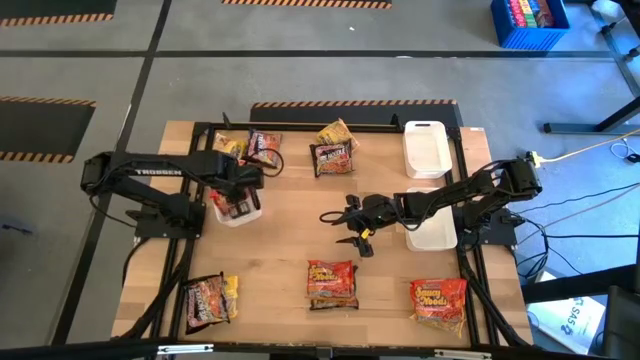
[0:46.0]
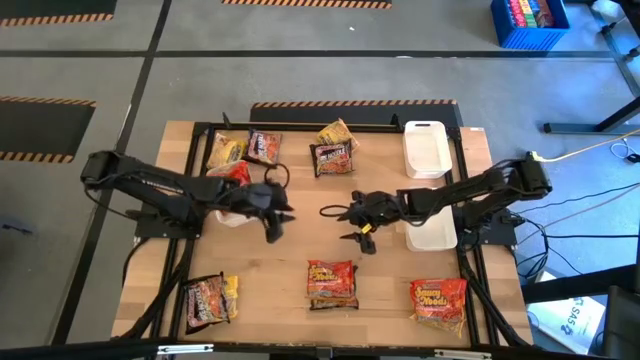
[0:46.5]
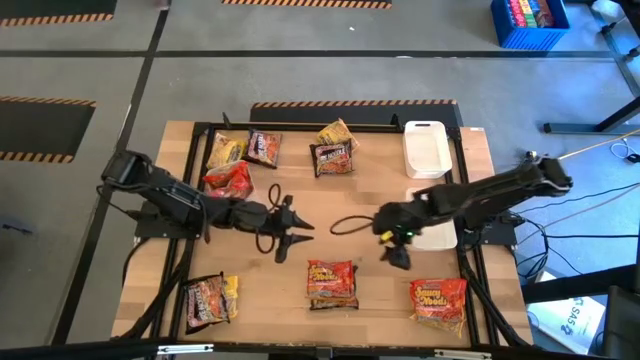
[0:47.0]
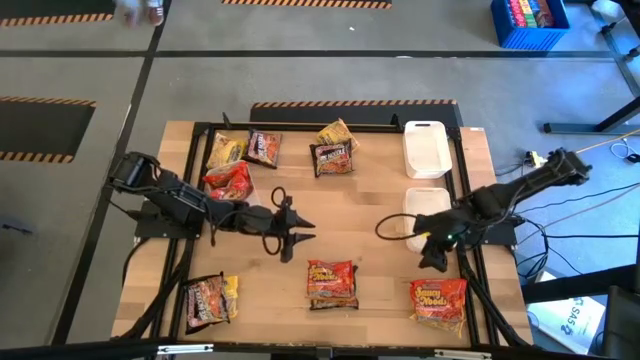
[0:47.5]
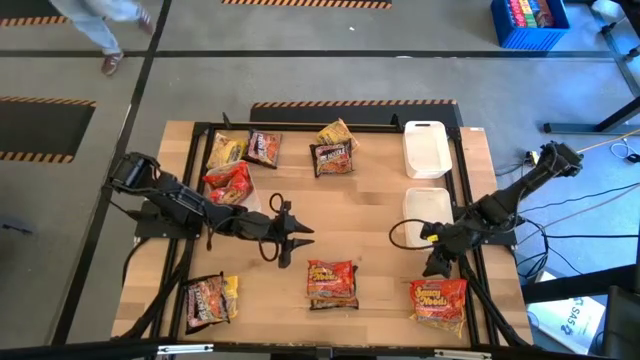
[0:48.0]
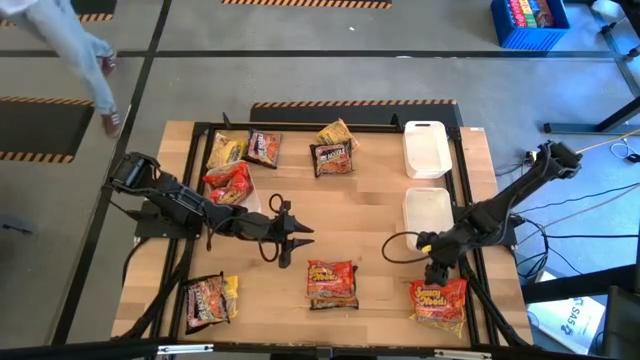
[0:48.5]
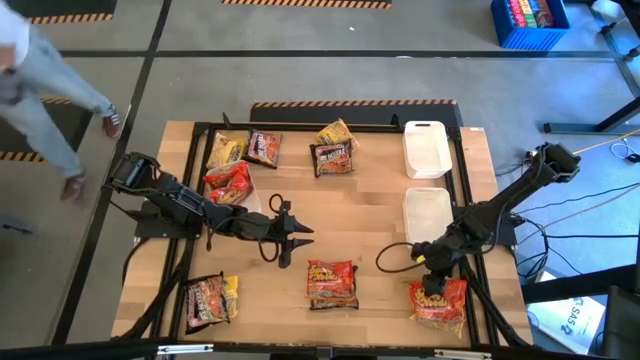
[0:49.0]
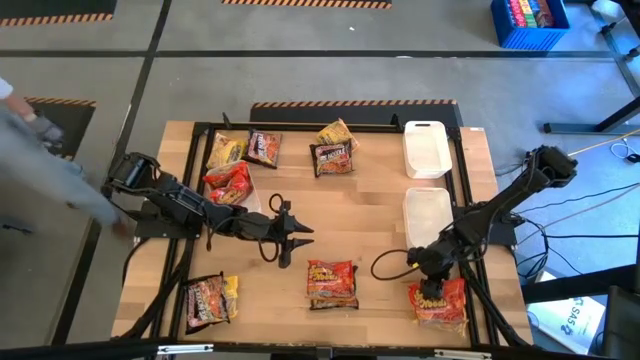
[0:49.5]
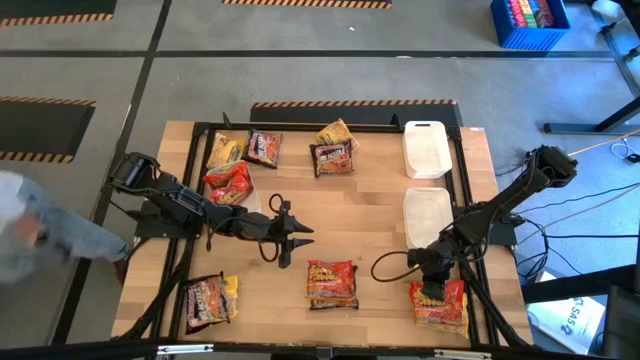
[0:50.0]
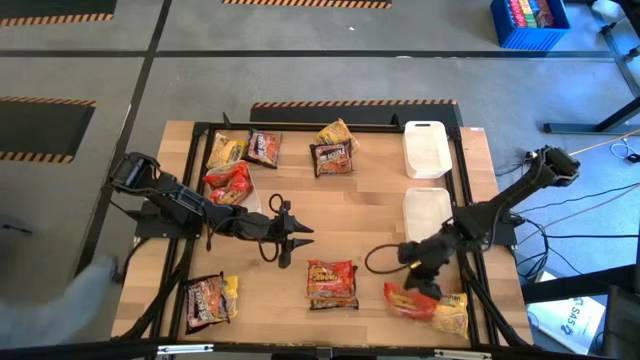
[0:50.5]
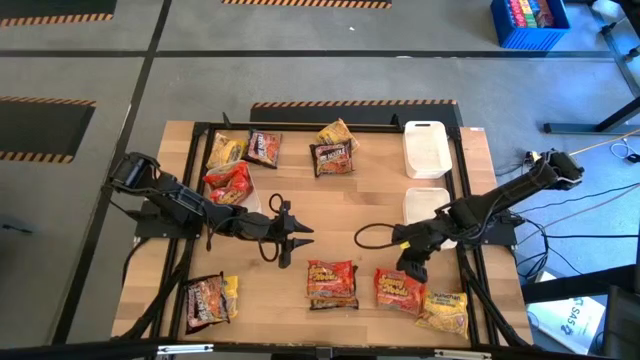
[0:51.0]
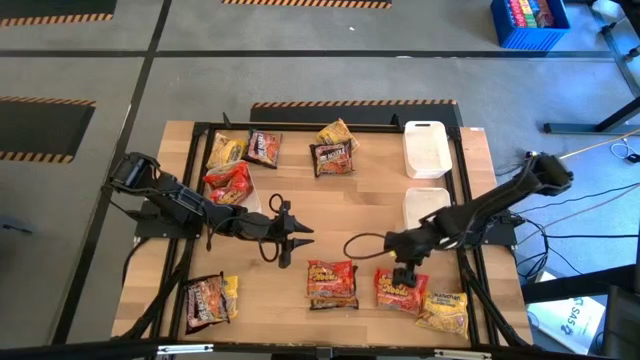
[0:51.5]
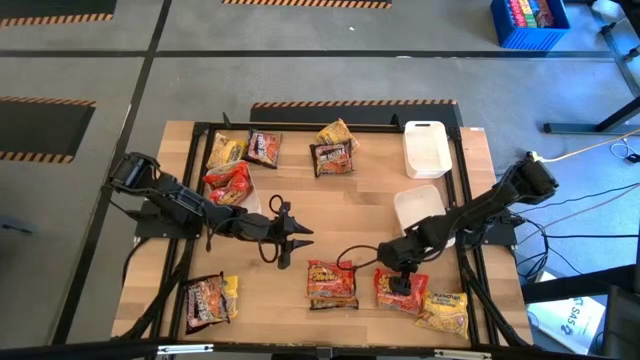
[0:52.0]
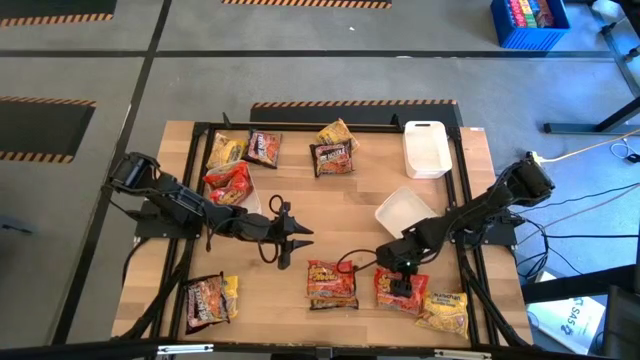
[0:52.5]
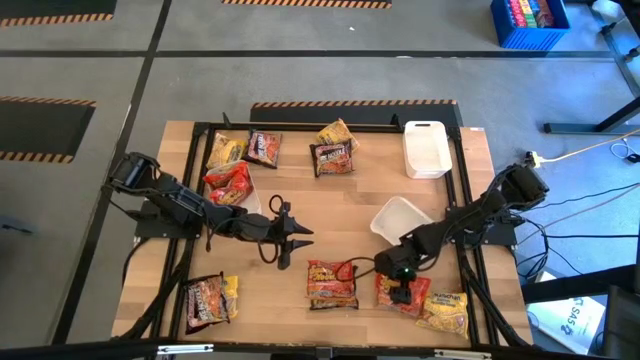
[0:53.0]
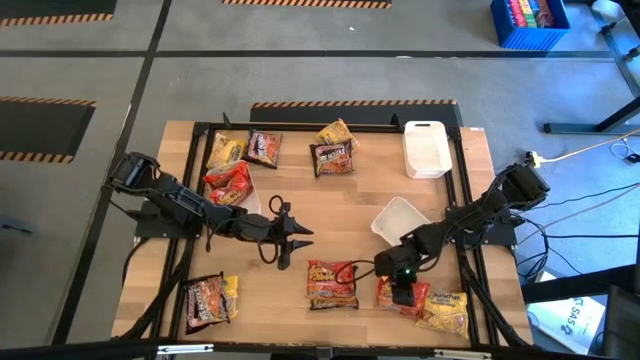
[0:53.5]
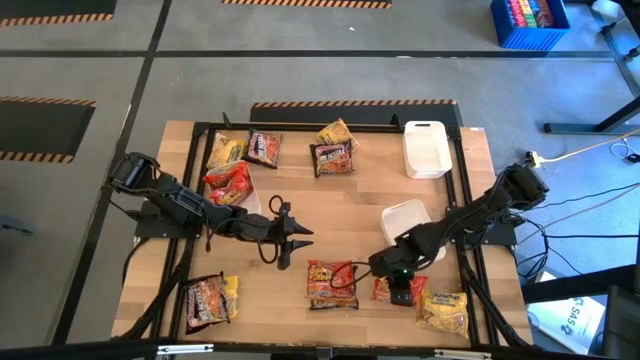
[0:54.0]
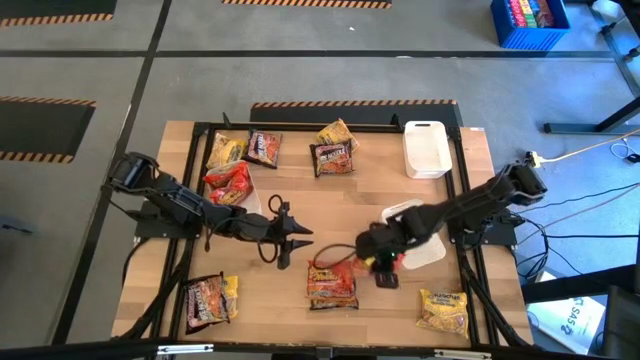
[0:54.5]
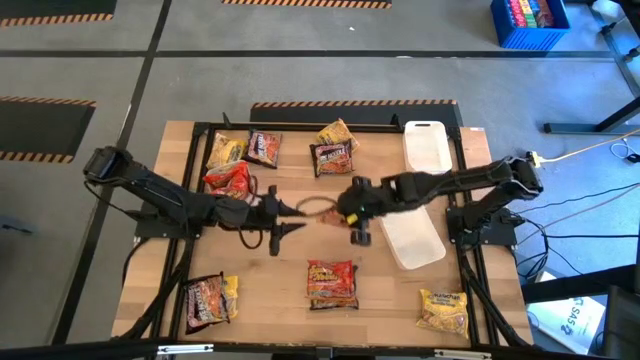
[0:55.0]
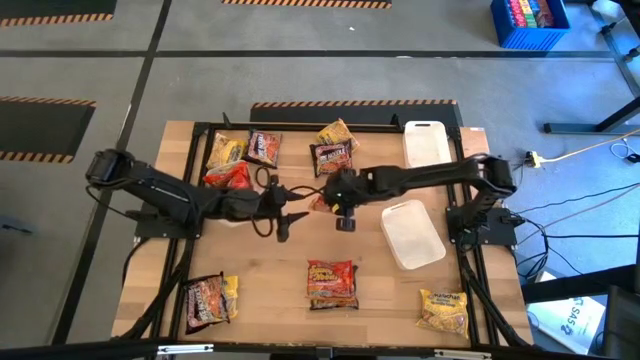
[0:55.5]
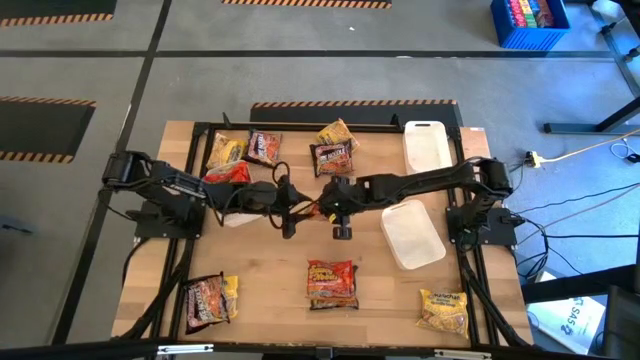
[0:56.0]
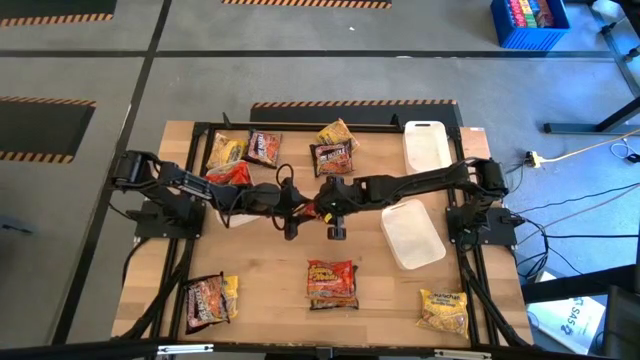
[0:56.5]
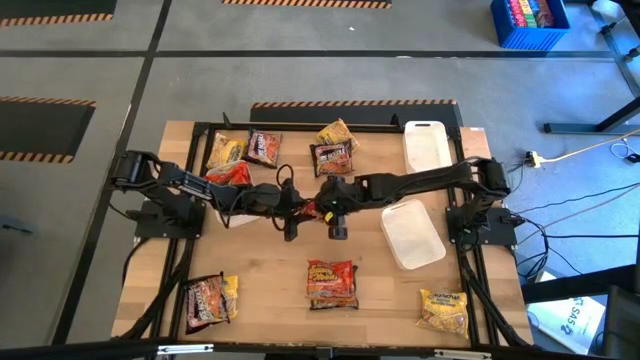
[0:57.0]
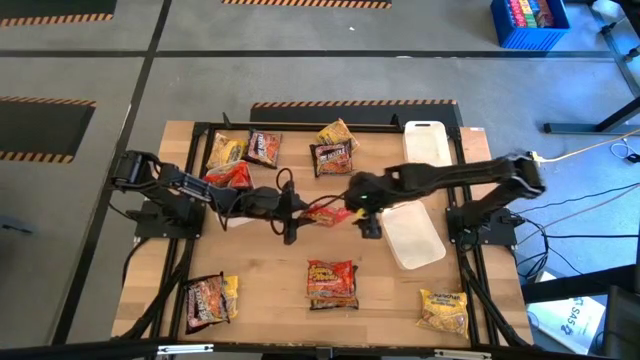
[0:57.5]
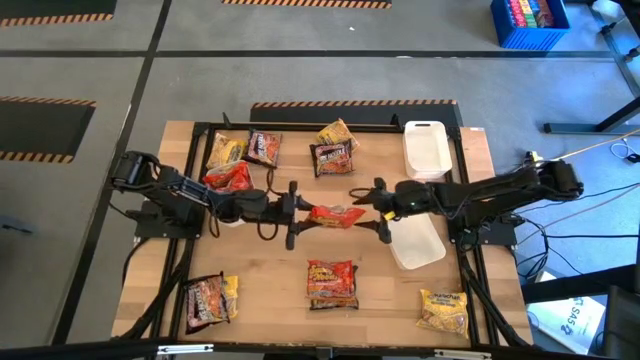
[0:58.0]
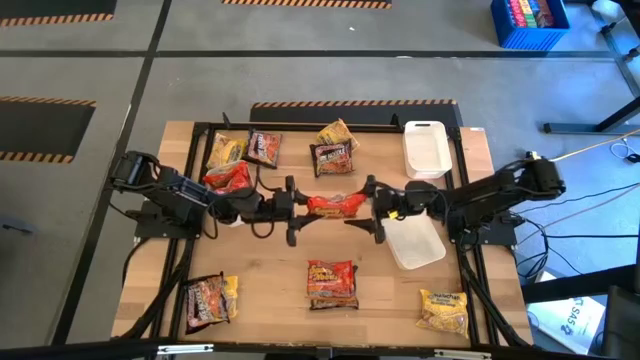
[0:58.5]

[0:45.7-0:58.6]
Task: Sort Maruchan noodles
Put the right orange noodle into the left white bin

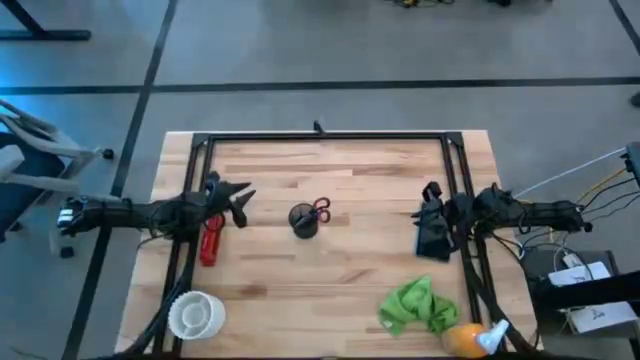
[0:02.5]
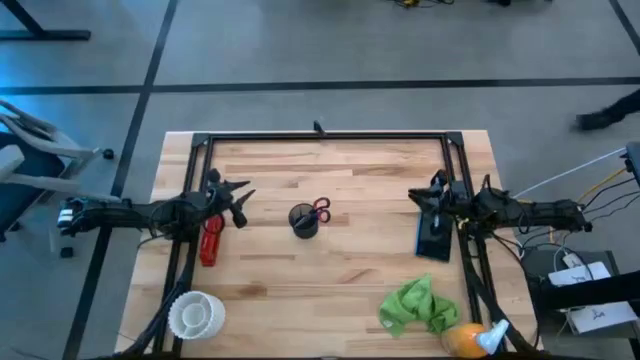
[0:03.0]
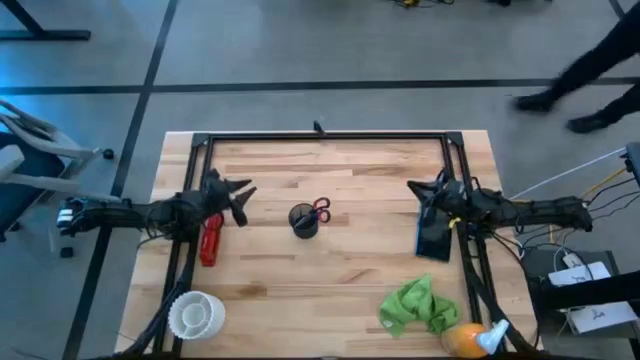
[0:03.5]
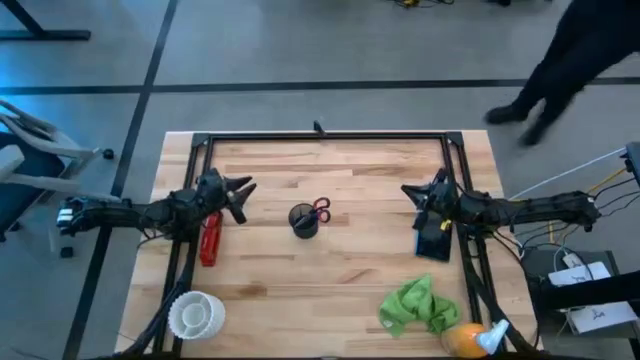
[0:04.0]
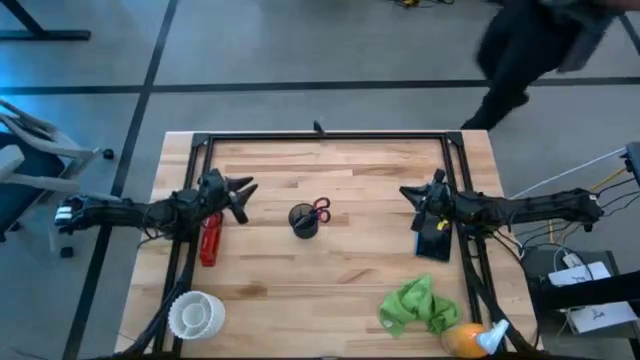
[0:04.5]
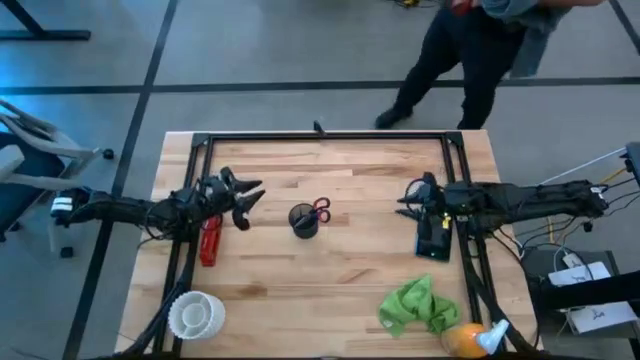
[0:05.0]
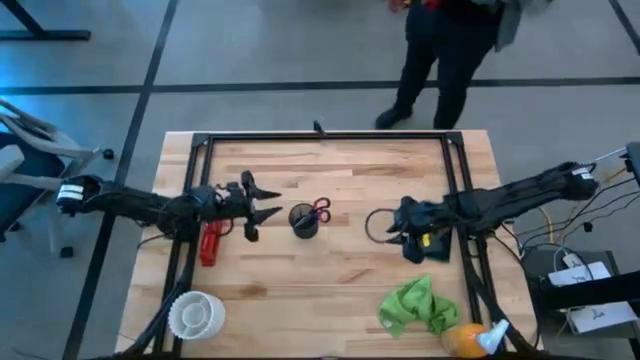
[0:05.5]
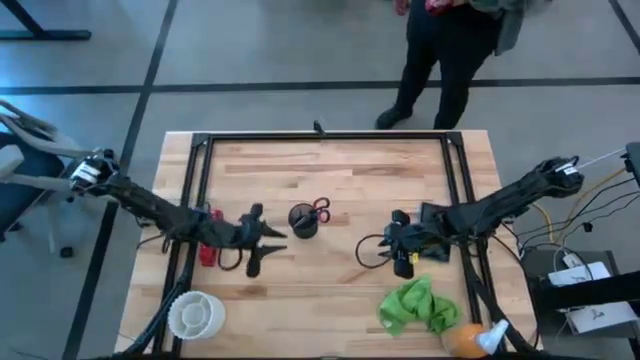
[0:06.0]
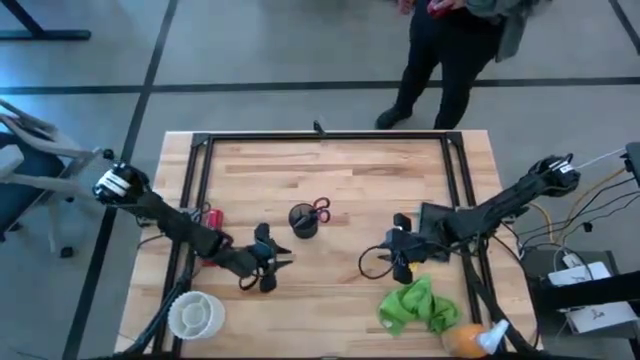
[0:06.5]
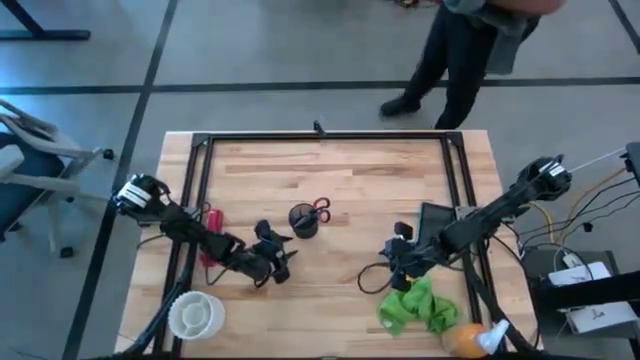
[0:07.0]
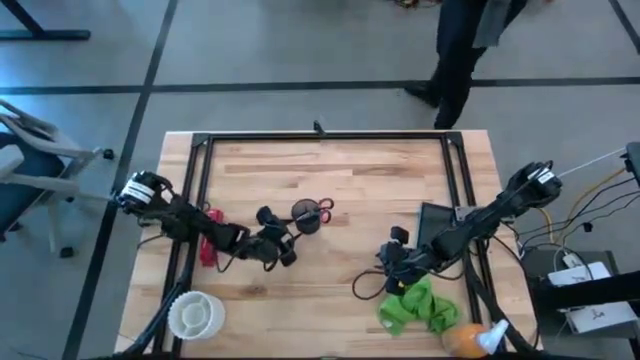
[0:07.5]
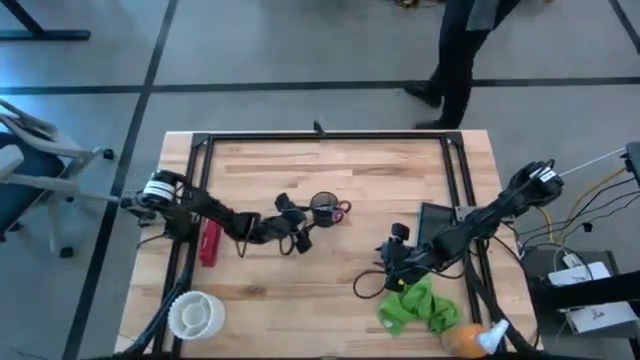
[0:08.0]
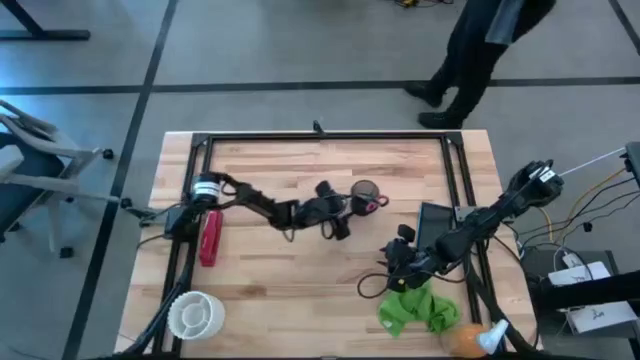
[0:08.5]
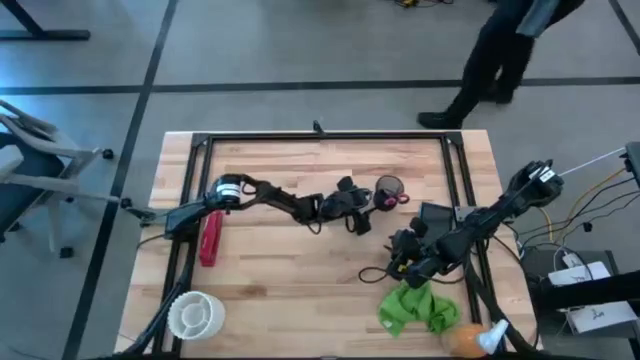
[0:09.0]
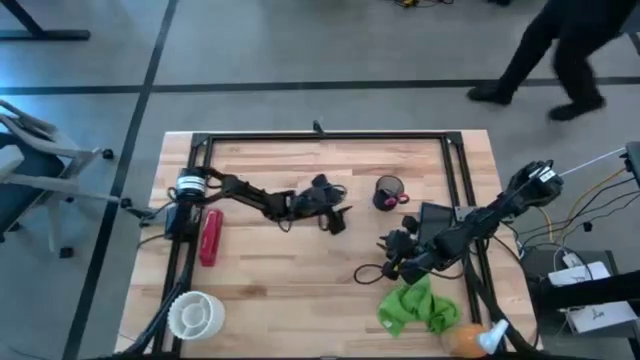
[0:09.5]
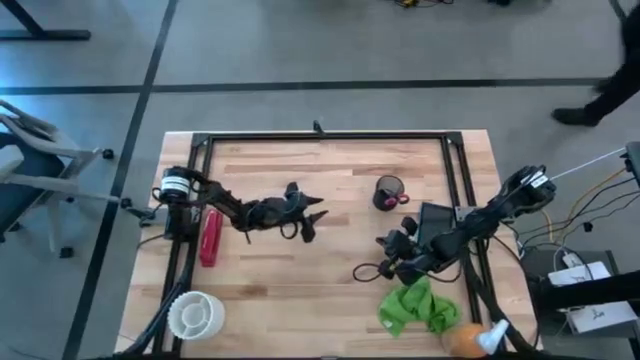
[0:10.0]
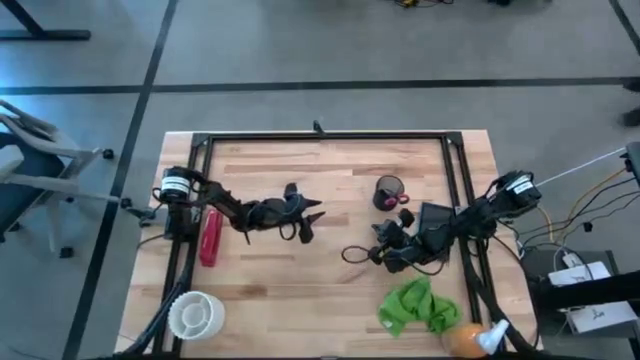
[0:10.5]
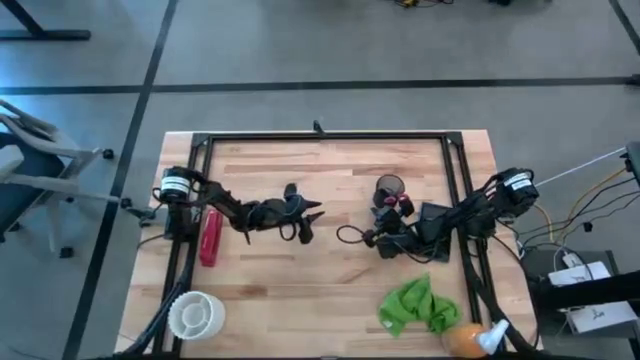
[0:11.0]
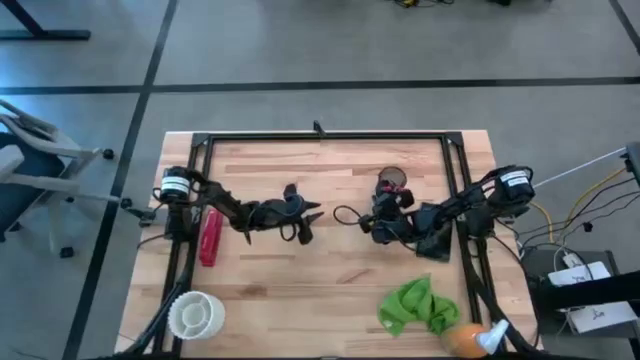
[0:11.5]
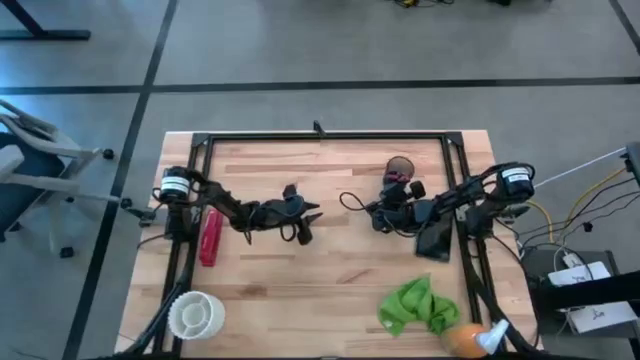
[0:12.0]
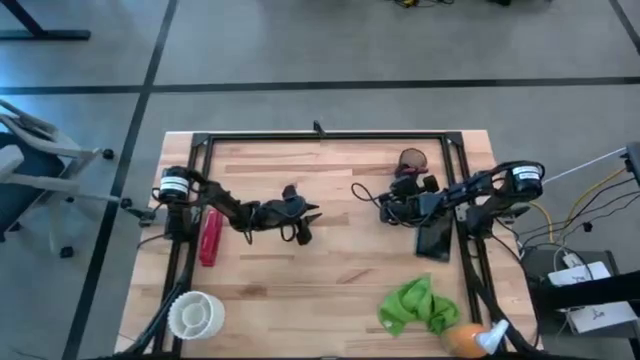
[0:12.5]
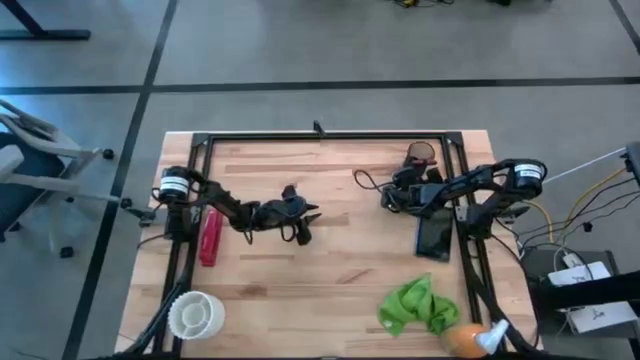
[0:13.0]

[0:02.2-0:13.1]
Task: Apply microfiber cloth
Move the black pen holder to the top right of the table
